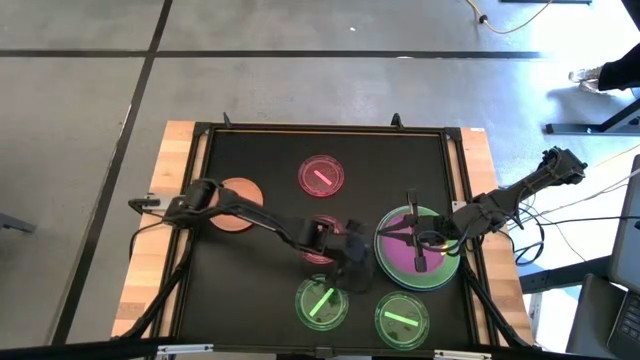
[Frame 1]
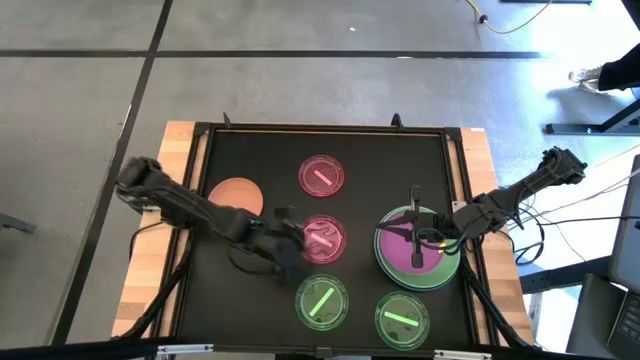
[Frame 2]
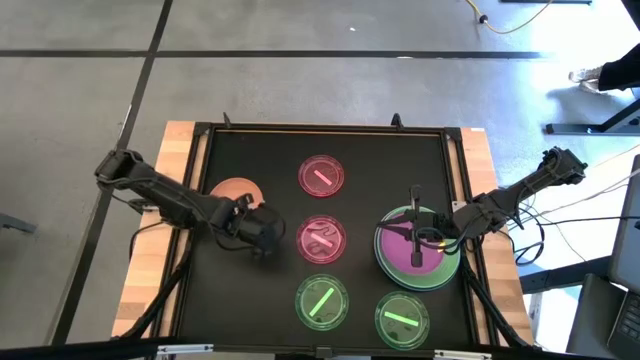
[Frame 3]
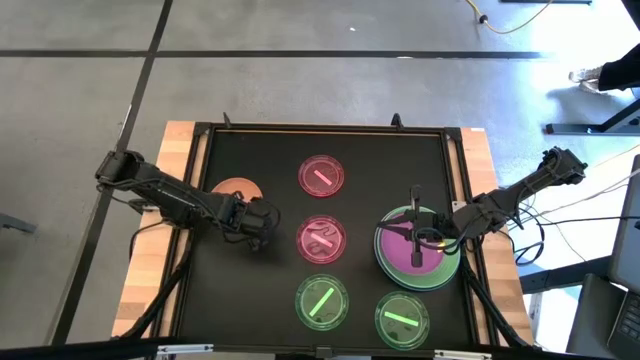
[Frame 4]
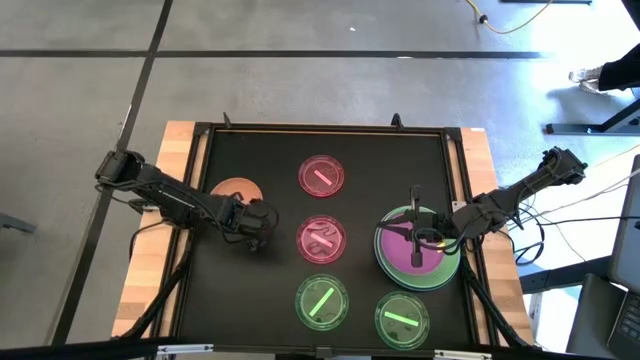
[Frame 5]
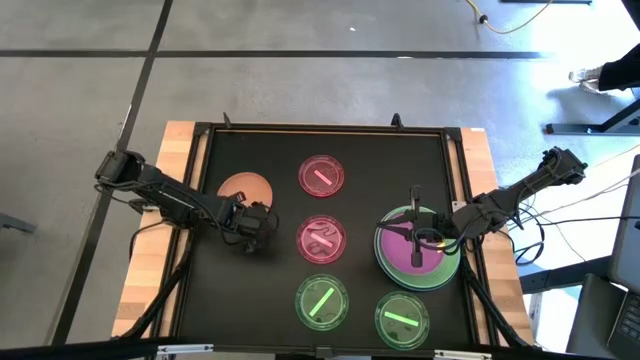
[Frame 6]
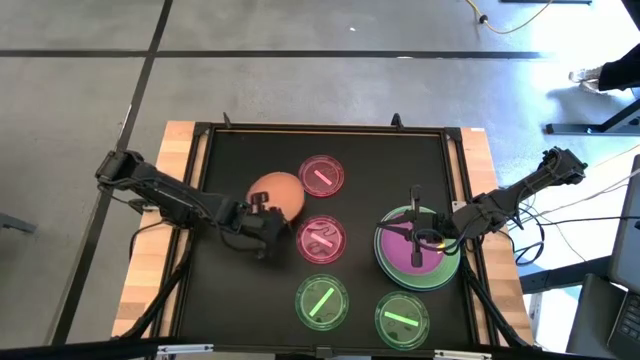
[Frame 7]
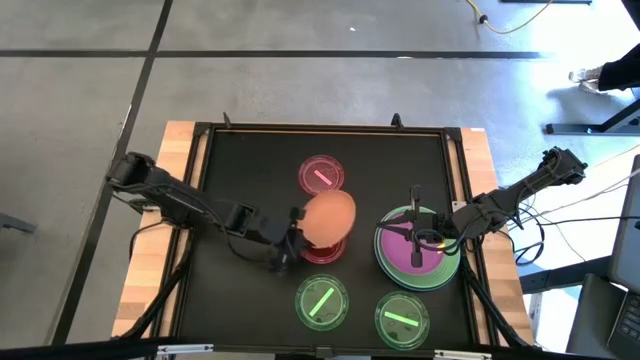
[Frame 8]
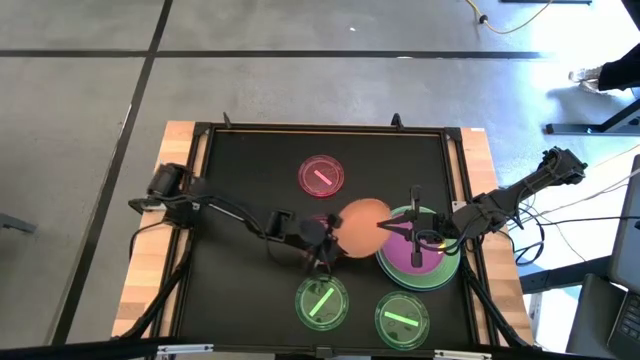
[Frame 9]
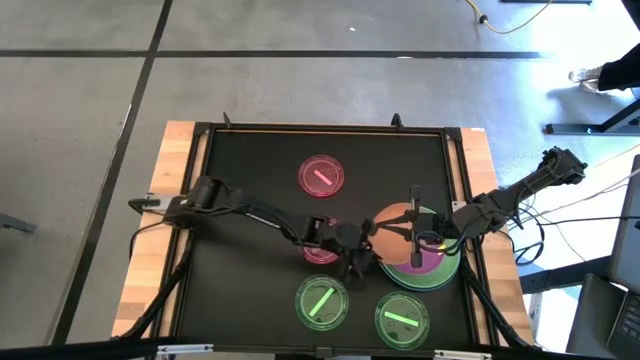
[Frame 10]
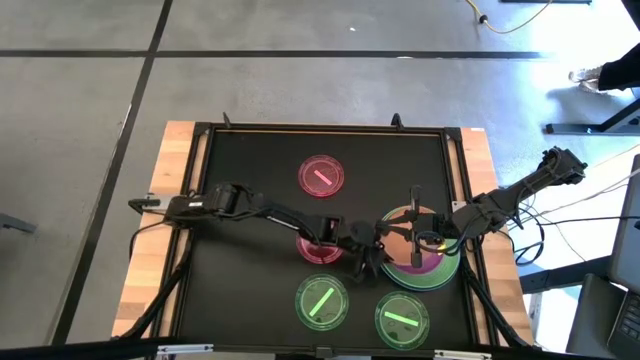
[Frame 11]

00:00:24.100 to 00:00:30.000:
Task: Stack plastic plates
Stack the orange plate on top of pink plate

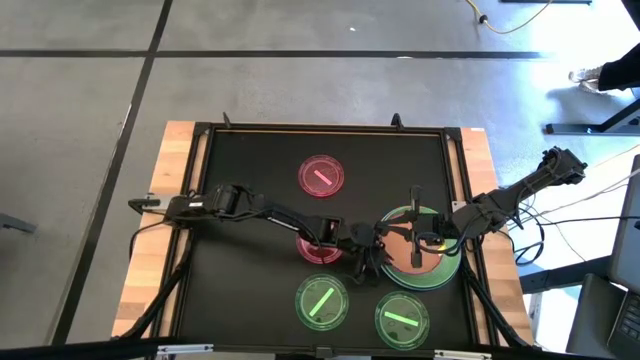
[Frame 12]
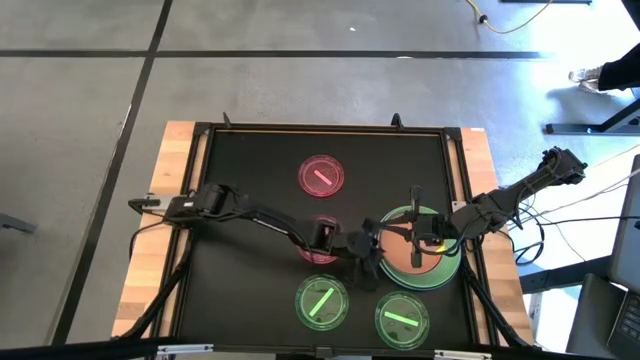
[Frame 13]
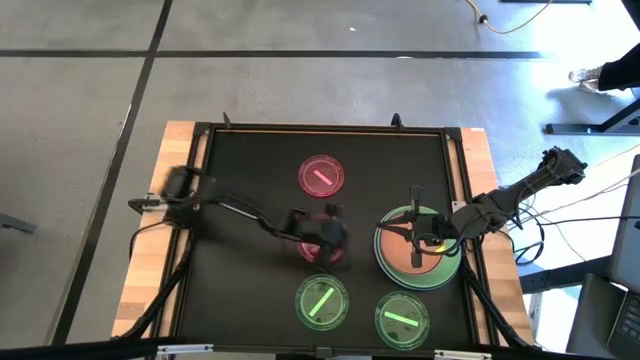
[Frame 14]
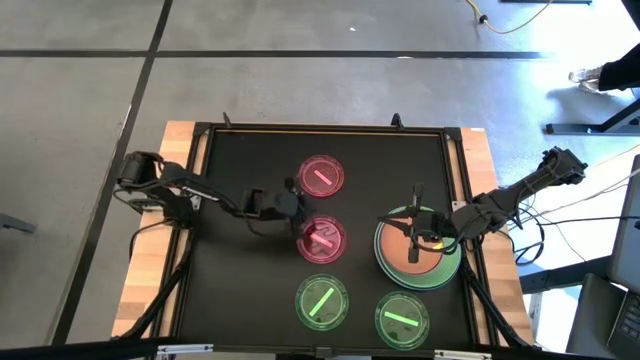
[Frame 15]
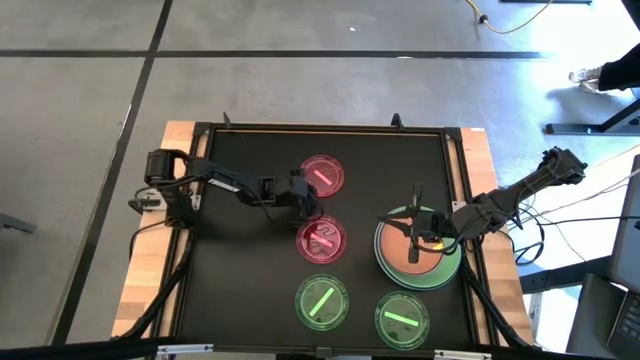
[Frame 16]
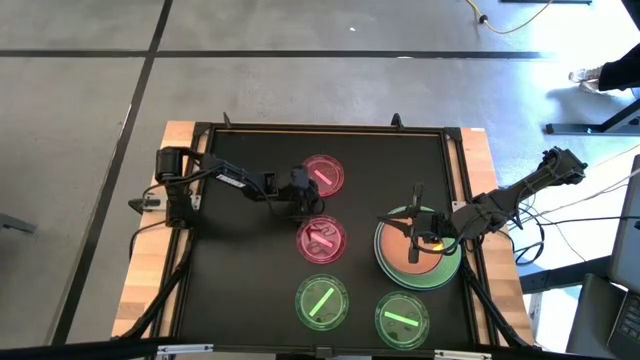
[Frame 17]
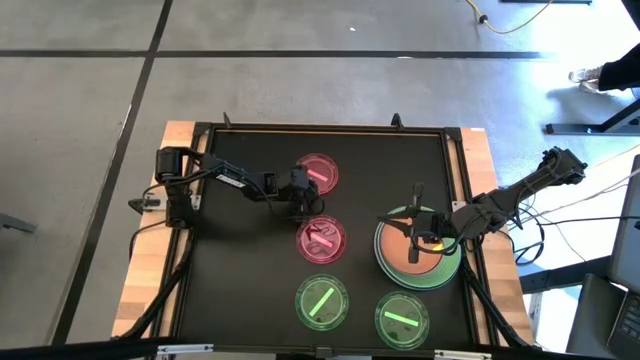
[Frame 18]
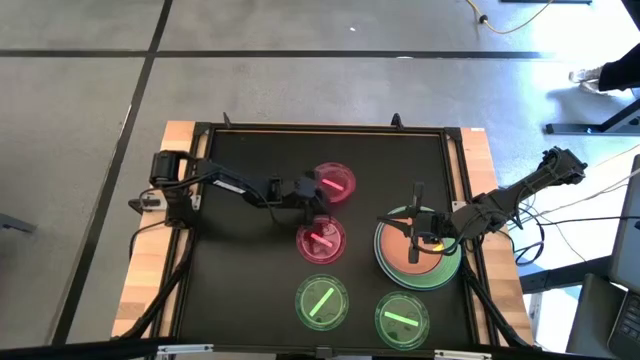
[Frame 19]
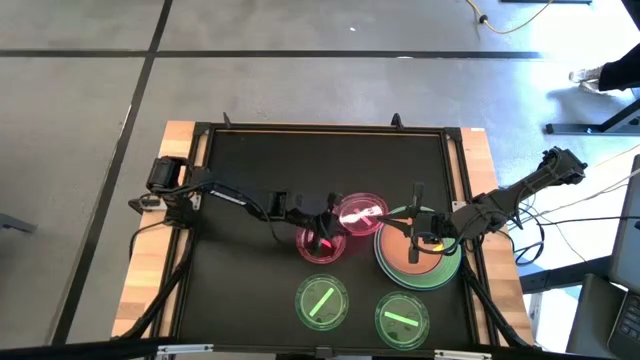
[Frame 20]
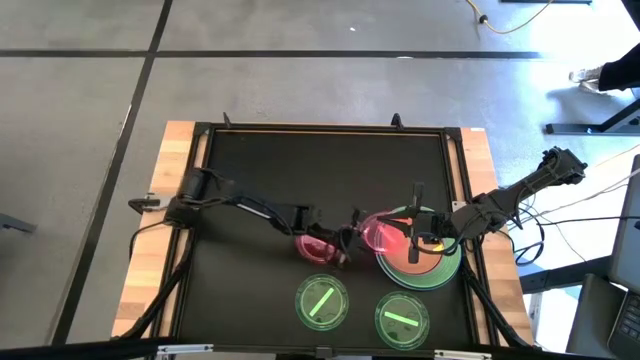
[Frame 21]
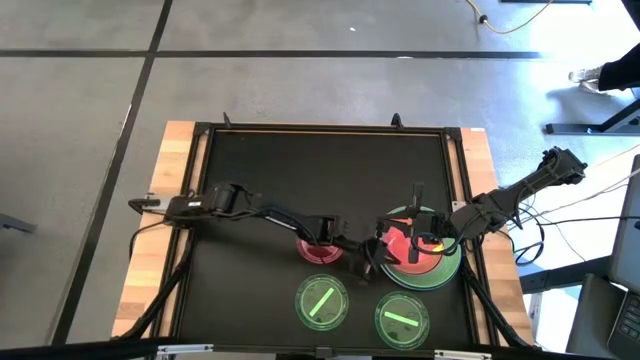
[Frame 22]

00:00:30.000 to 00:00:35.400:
Stack the top pink plate on top of orange plate

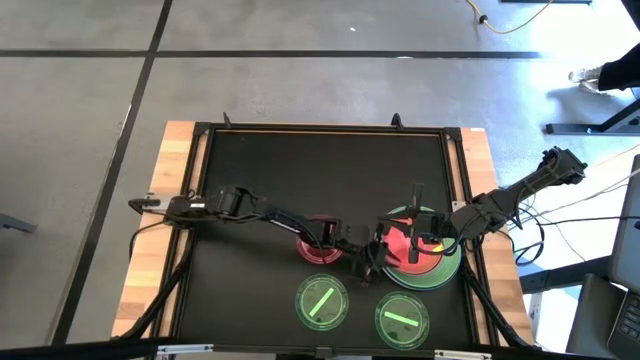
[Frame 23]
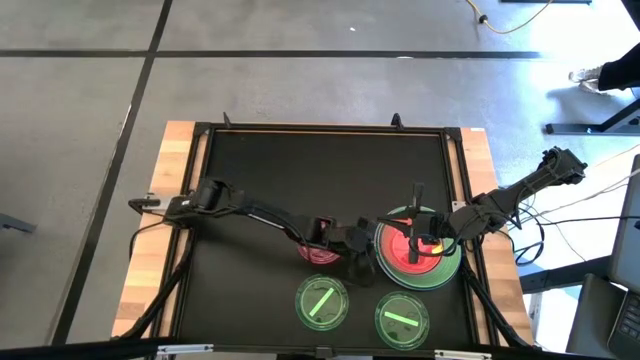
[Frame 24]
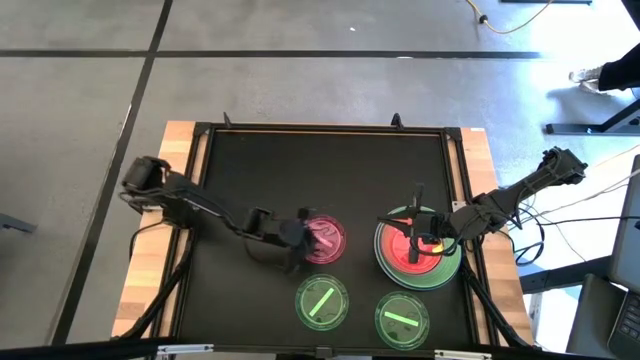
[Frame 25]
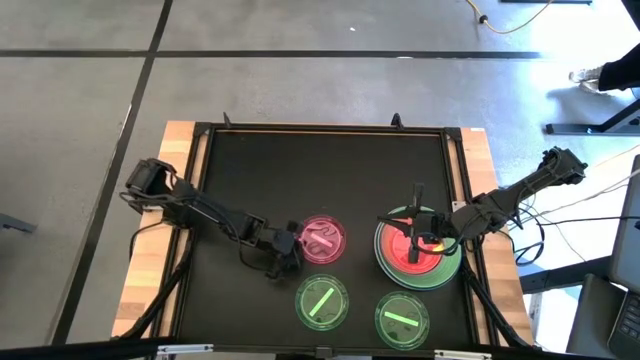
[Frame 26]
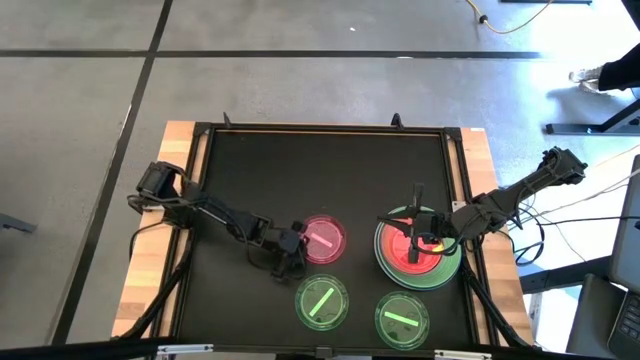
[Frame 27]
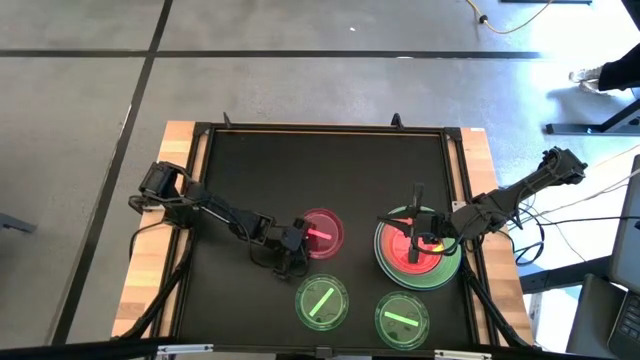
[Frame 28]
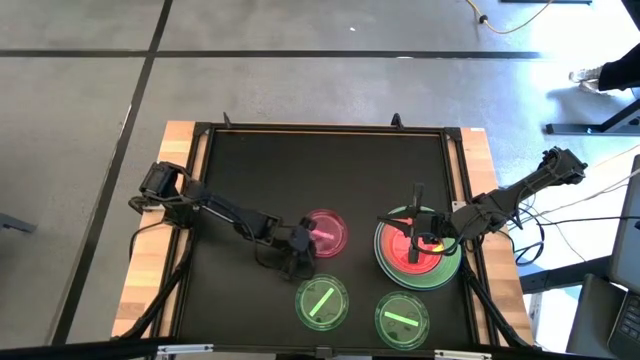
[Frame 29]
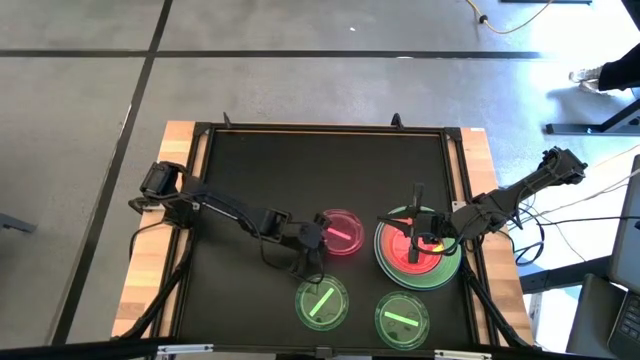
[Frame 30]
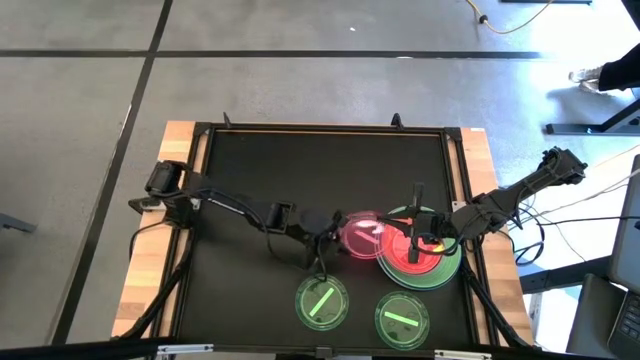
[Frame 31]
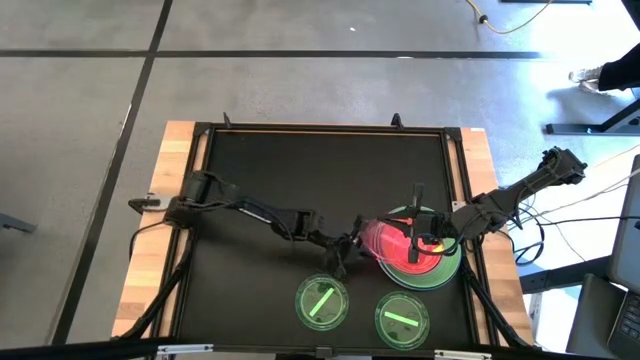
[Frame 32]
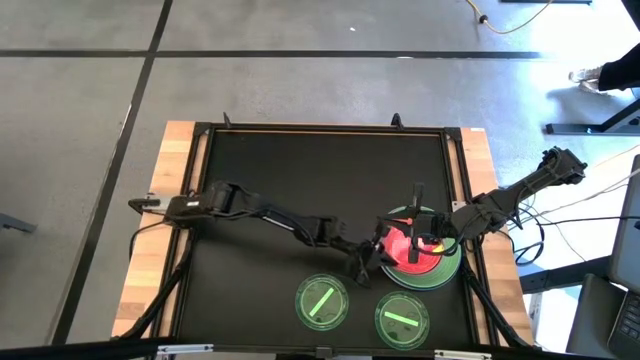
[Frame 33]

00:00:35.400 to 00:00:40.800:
Stack the left pink plate on top of pink plate

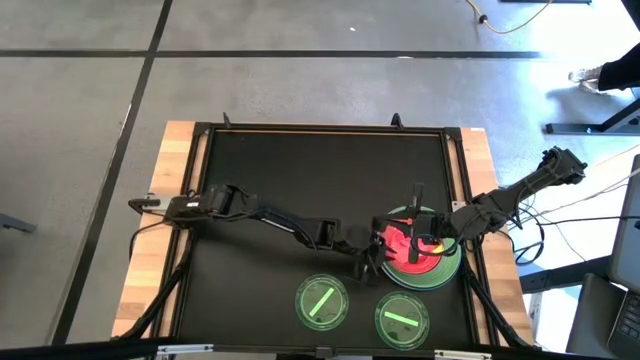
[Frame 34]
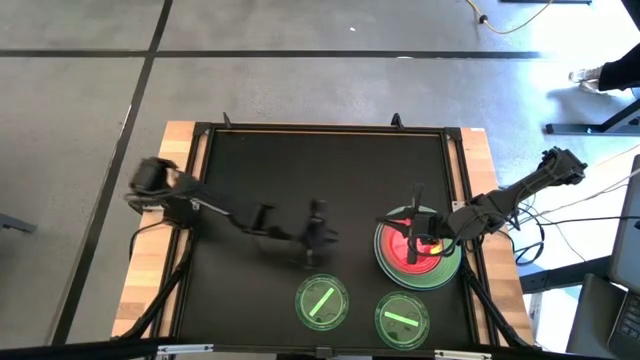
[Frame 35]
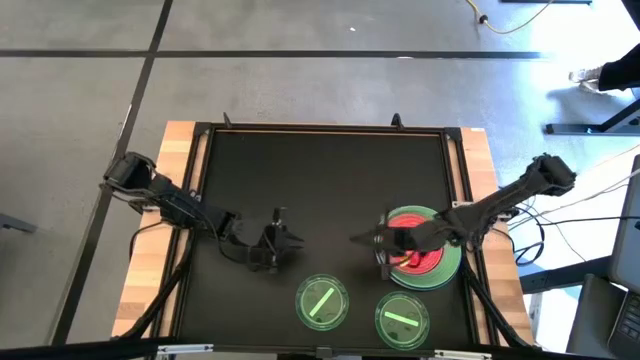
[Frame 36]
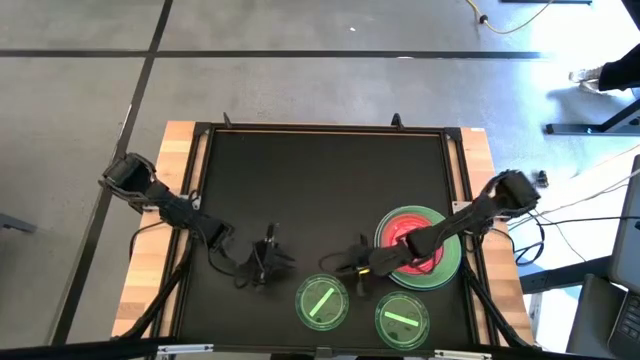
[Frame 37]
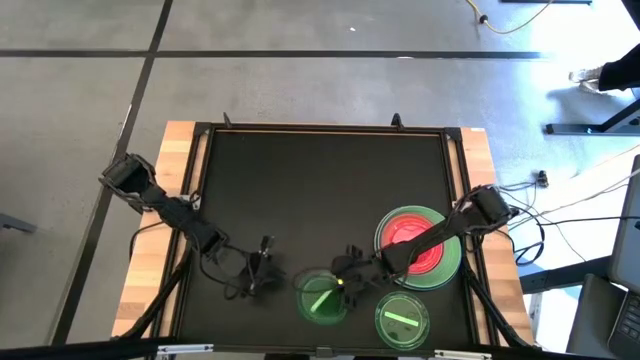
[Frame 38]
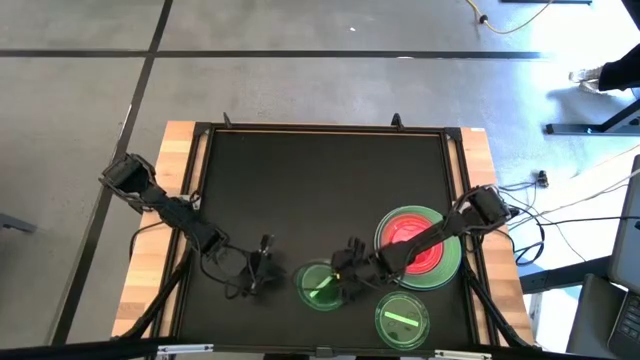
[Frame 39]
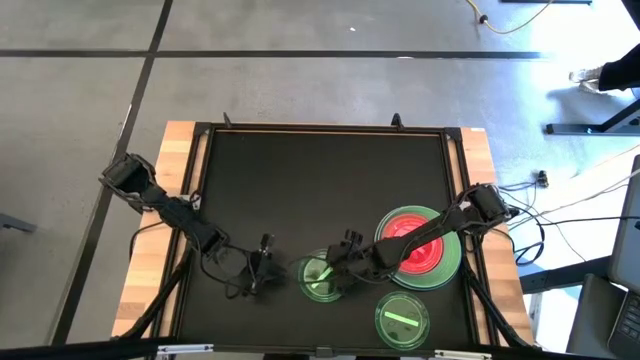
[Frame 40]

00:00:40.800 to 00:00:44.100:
Stack the left green plate on top of pink plate

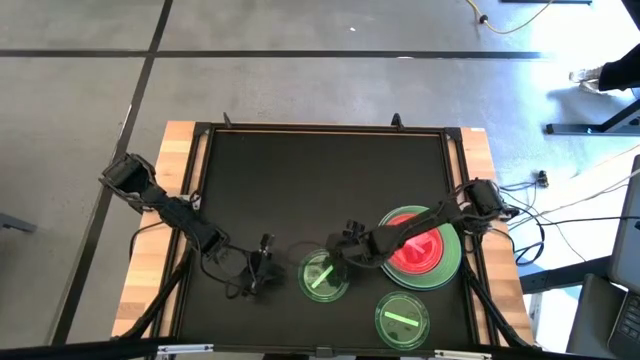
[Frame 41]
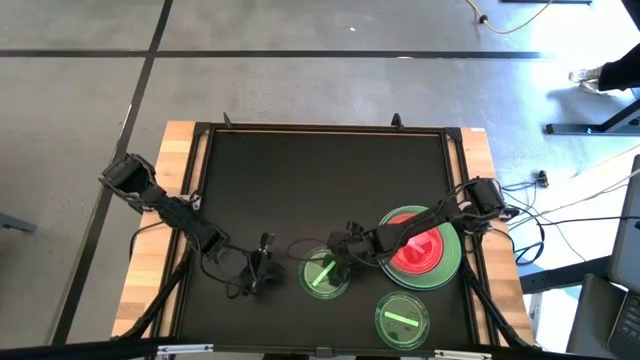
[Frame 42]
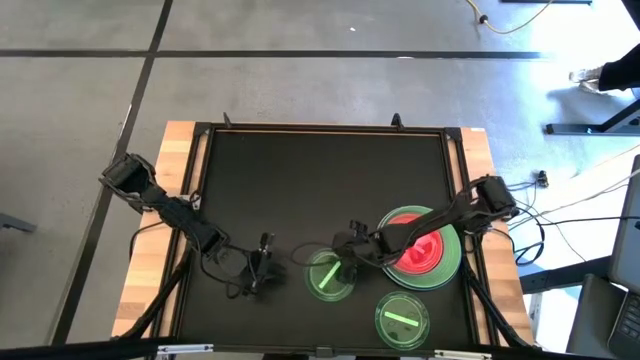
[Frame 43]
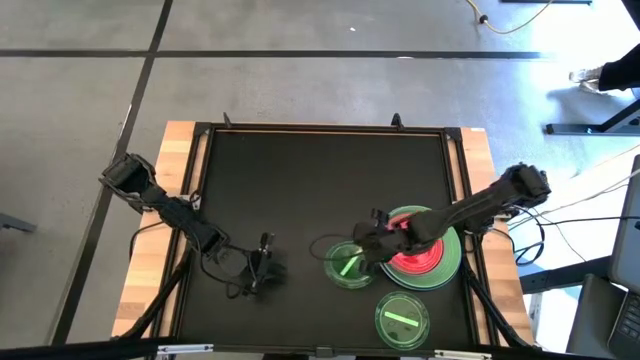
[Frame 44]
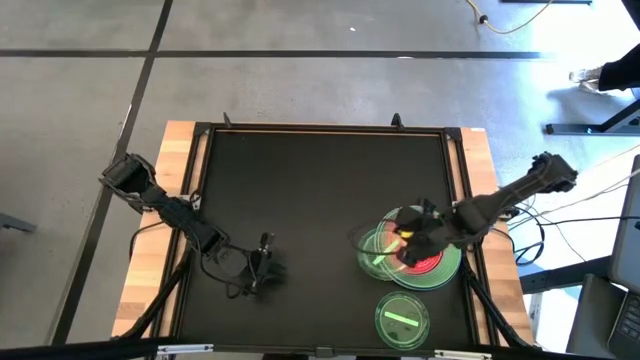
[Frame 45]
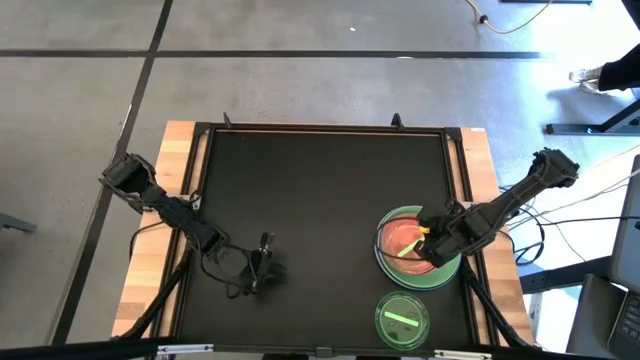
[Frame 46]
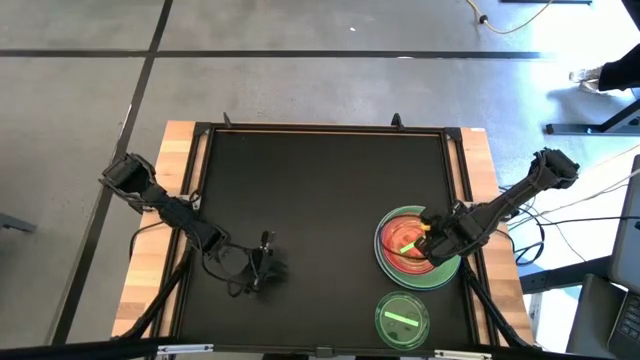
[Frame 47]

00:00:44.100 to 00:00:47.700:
Stack the left green plate on top of pink plate
